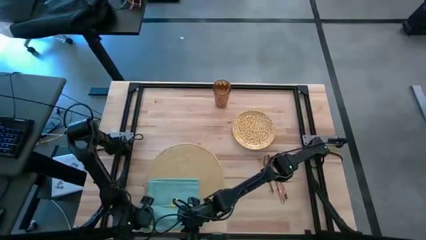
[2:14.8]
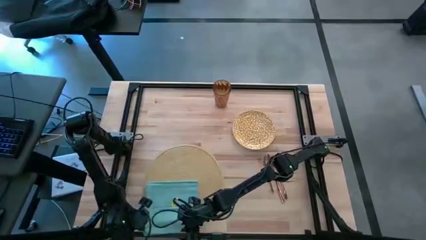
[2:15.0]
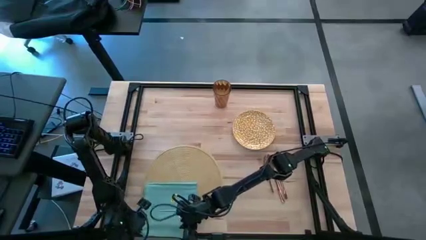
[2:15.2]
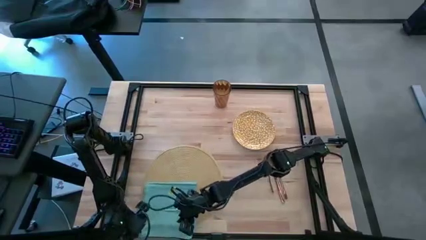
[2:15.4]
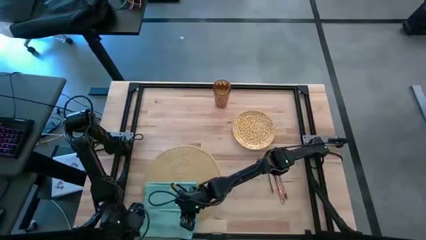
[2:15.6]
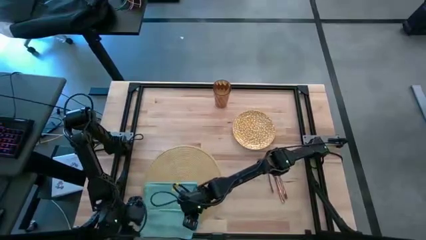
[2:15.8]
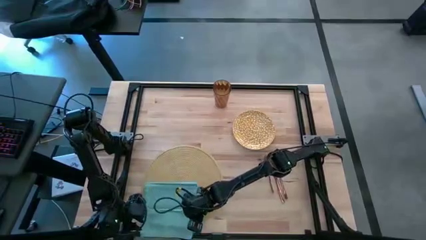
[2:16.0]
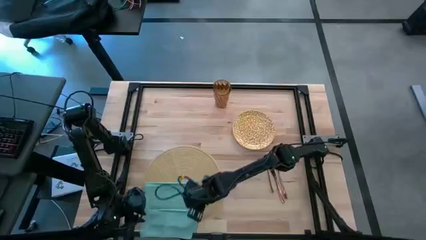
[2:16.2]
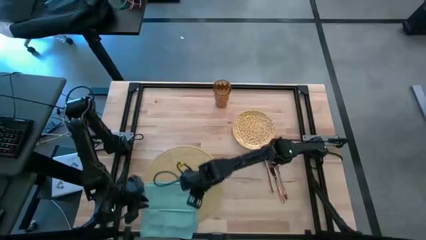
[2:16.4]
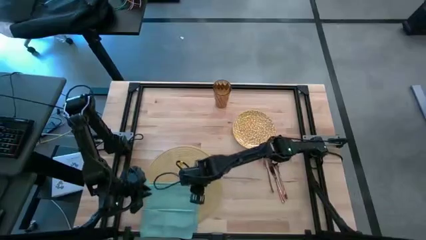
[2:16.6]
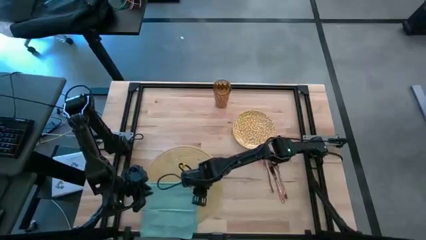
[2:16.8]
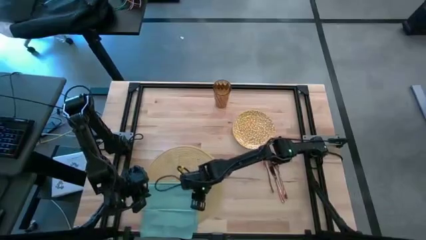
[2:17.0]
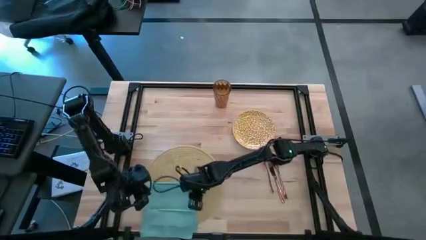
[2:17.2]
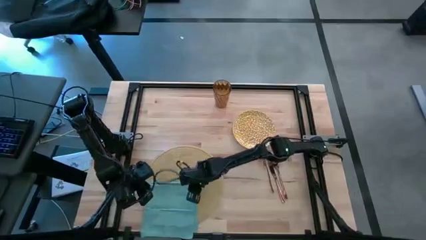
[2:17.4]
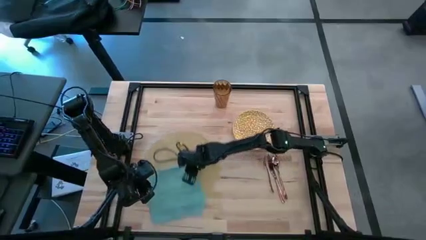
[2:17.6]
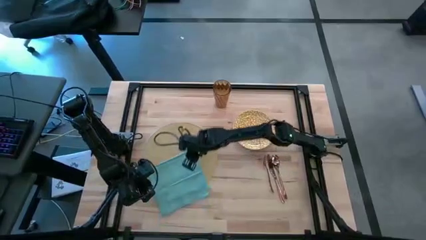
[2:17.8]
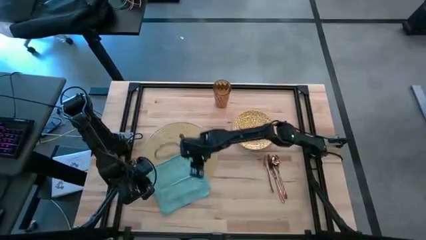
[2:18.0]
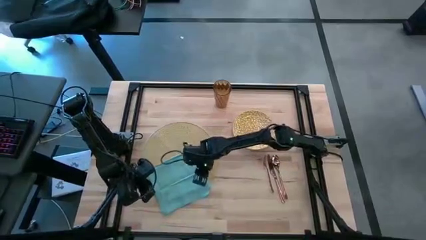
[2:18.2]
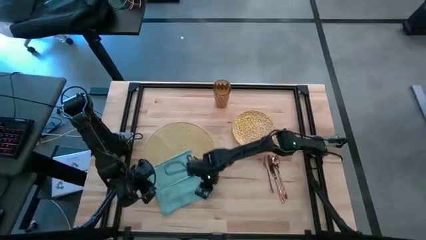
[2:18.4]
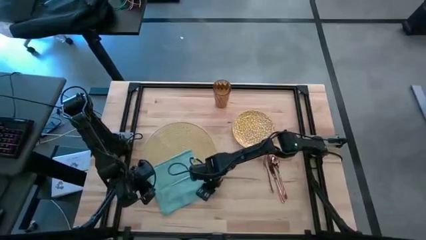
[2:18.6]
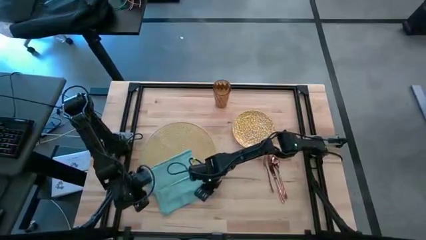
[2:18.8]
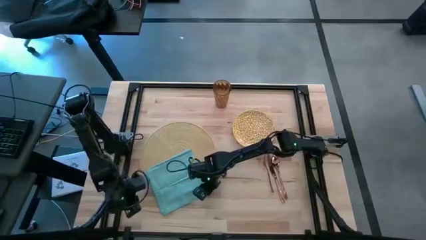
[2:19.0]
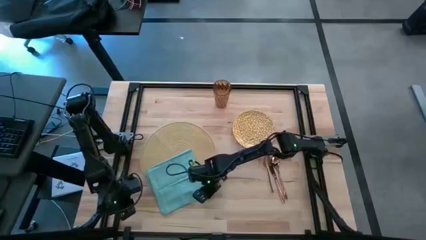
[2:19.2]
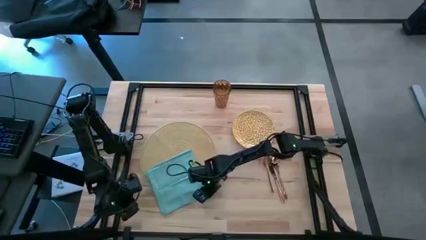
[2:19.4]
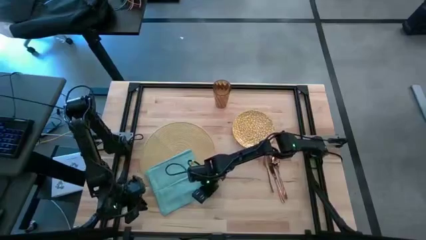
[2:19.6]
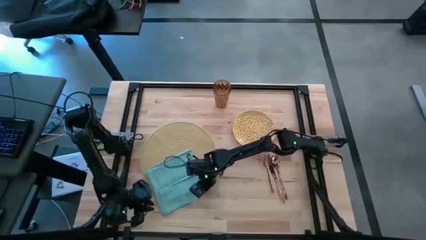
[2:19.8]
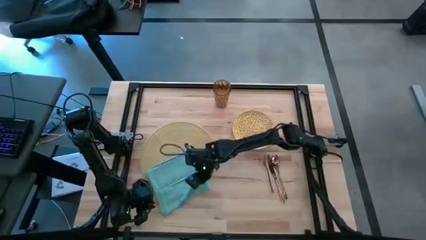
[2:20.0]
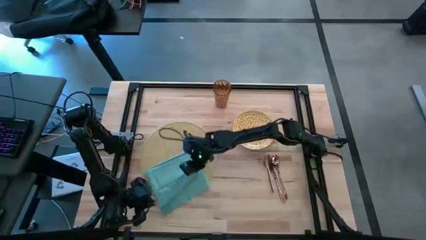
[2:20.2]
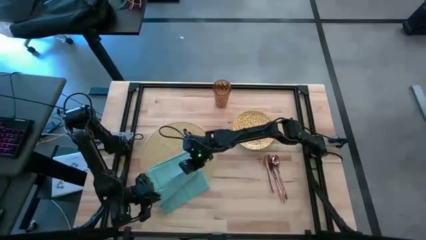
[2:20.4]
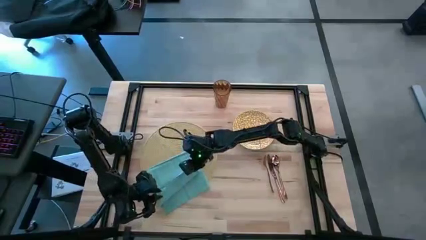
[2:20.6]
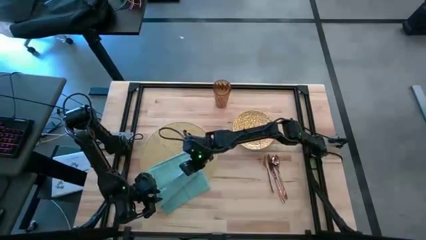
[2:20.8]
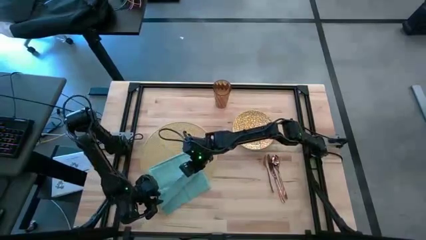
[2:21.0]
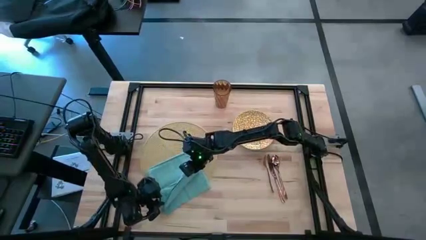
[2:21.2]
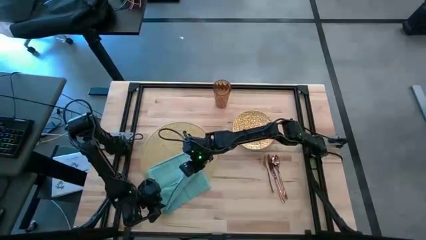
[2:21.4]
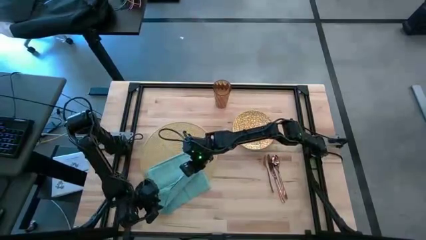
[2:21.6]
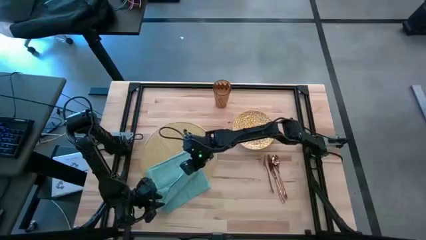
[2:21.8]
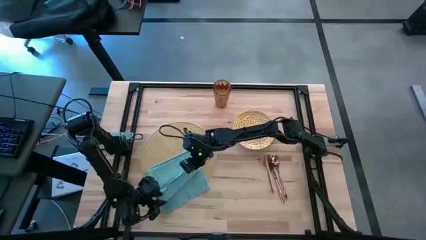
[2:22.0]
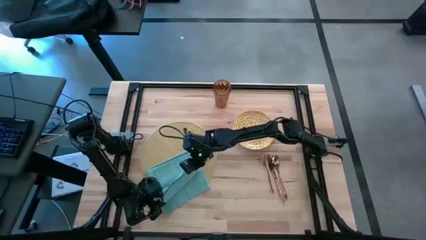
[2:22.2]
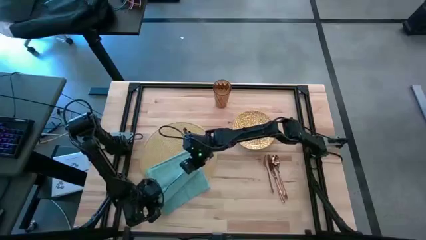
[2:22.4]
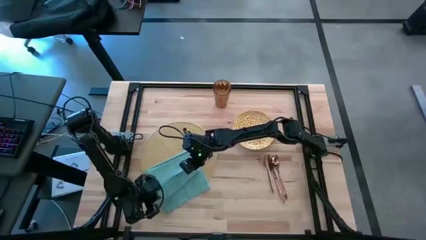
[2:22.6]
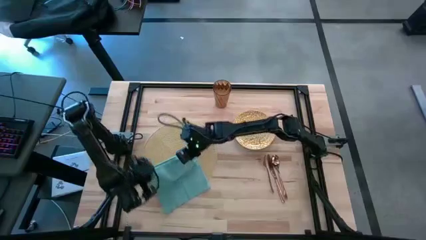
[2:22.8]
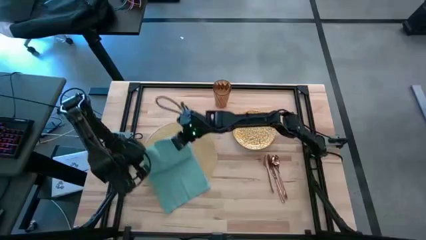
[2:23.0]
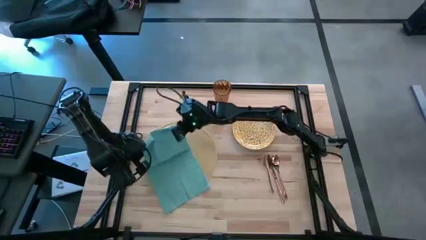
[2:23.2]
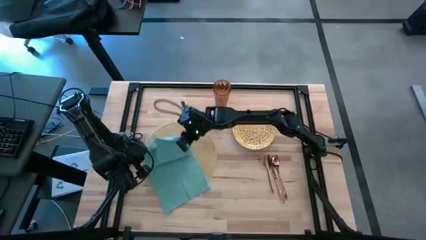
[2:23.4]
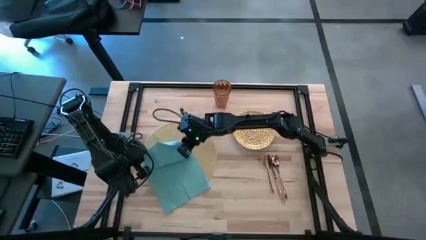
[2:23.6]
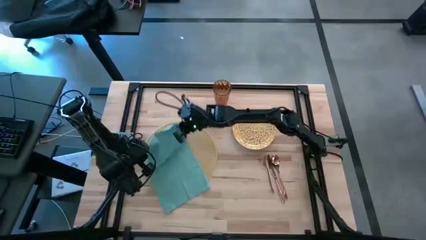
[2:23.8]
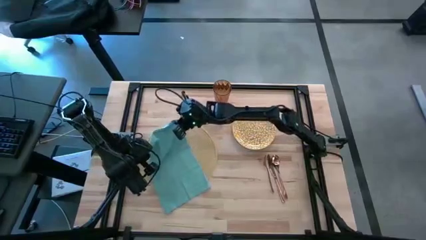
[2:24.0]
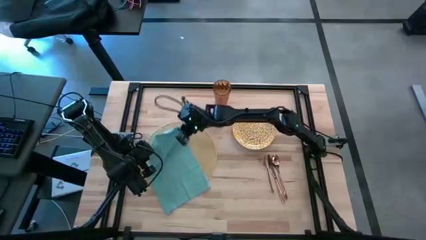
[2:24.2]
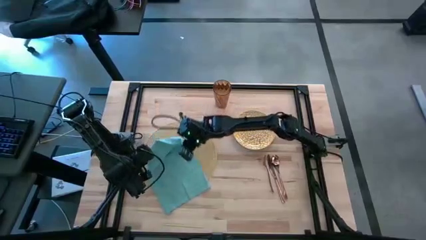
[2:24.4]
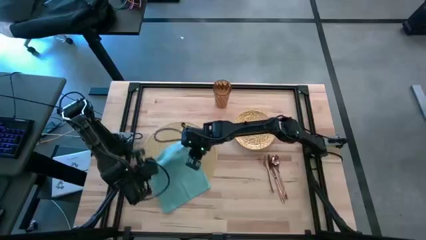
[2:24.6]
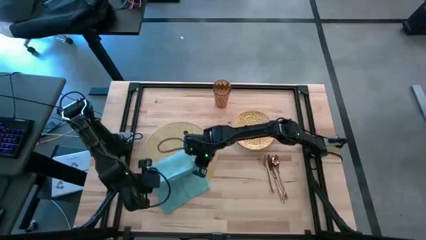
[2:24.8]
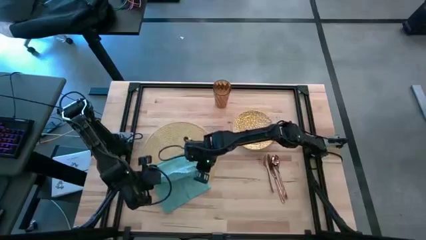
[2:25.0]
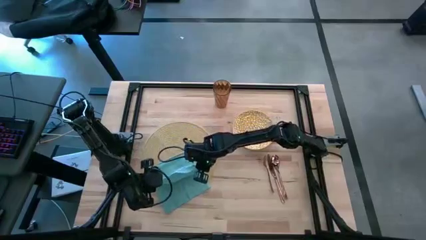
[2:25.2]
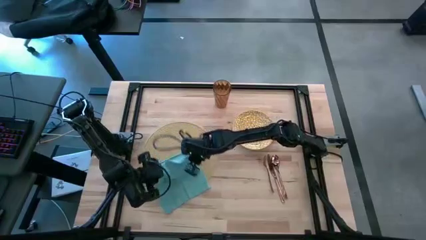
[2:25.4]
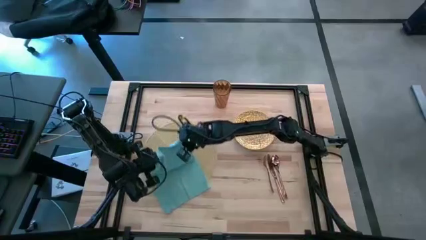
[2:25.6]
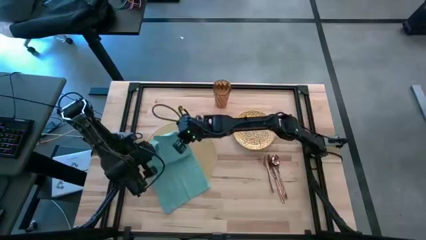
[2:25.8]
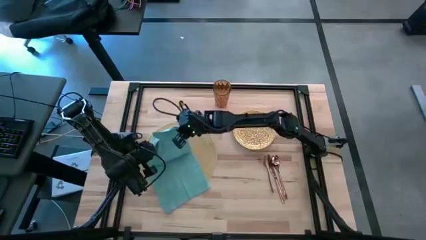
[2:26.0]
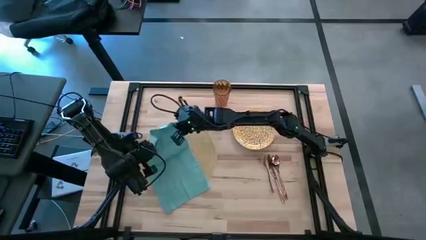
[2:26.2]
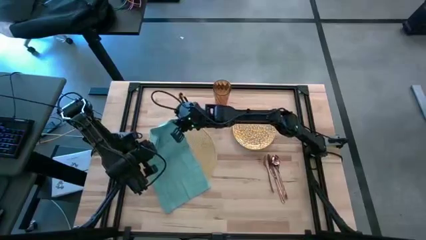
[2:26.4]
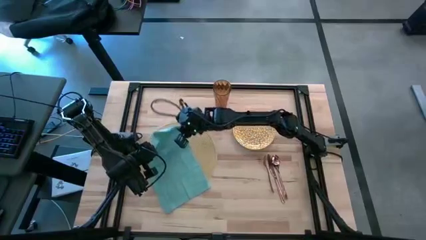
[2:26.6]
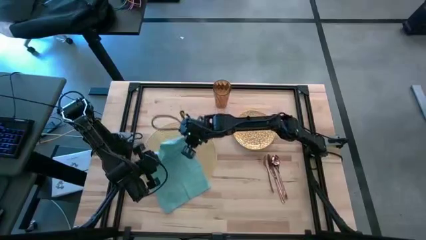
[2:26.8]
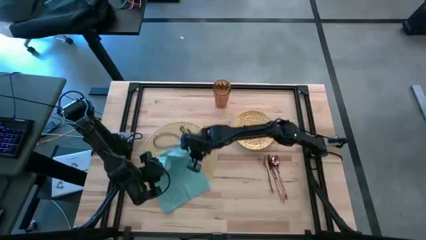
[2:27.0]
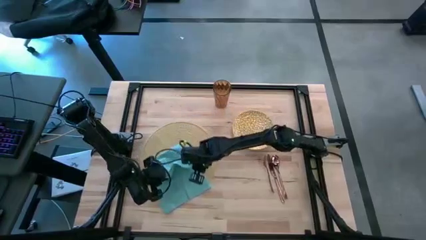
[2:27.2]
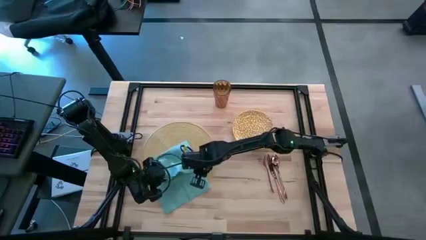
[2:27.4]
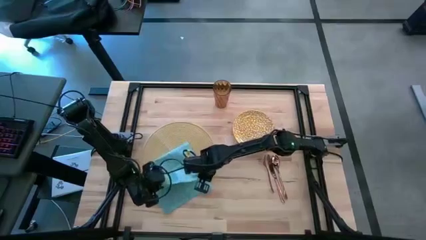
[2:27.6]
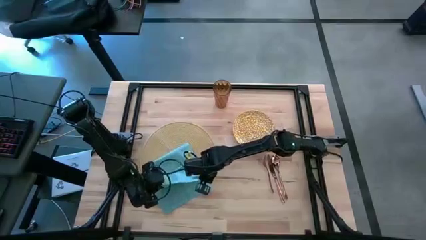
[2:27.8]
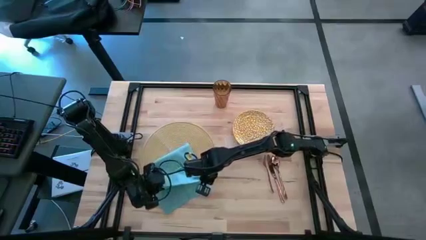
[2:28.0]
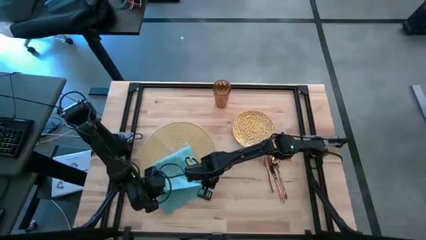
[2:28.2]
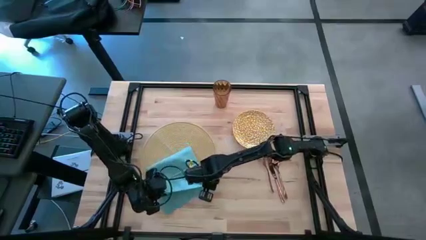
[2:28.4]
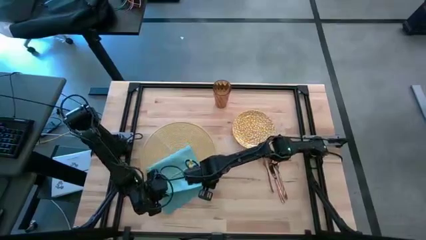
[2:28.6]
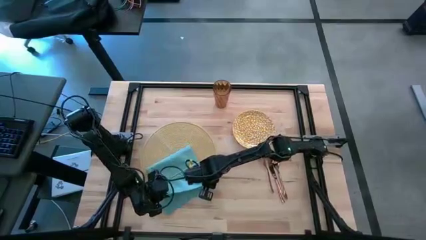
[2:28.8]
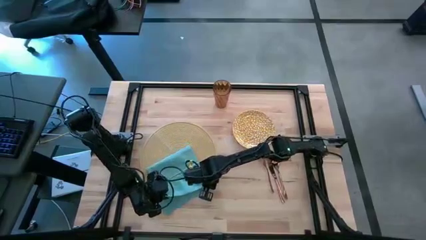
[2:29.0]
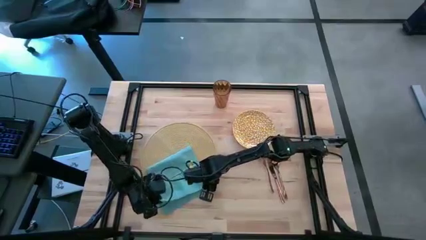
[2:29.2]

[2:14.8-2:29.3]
Task: Set table place
Fold the blue table napkin
